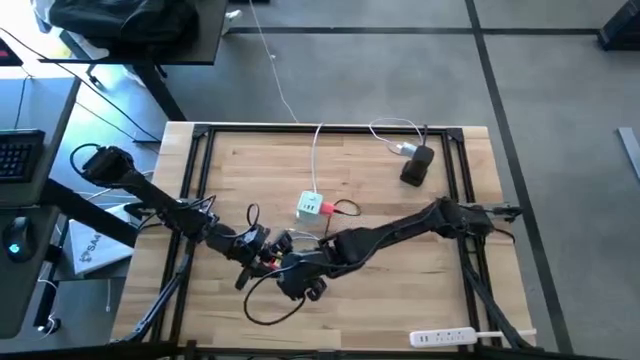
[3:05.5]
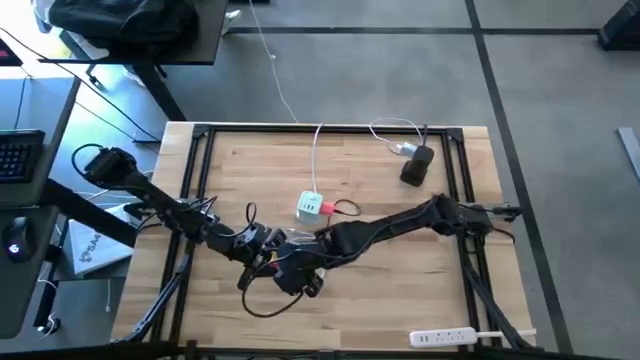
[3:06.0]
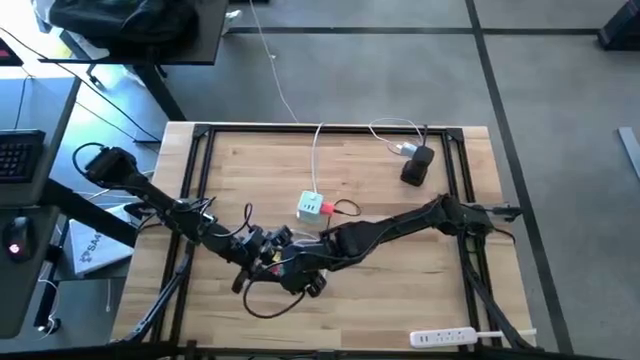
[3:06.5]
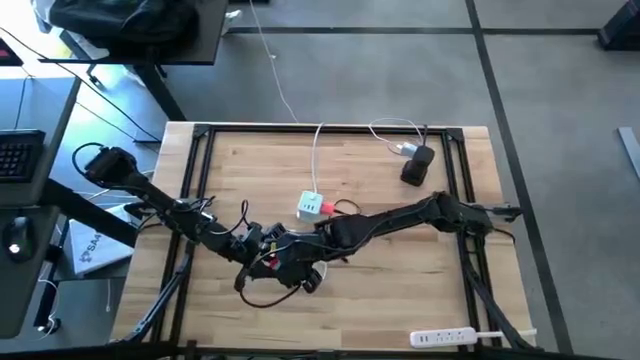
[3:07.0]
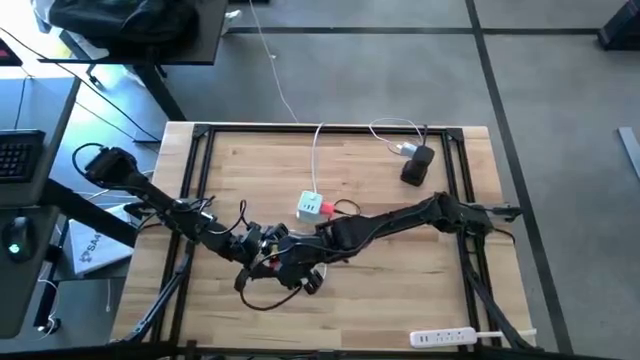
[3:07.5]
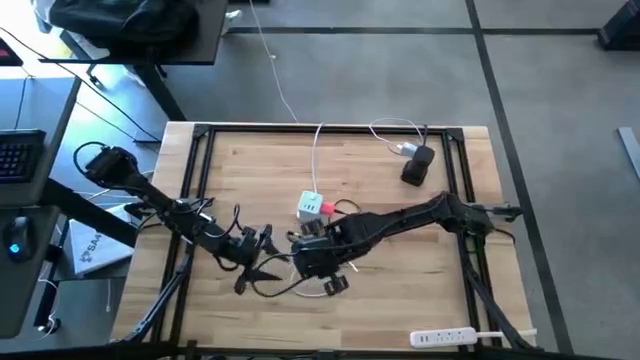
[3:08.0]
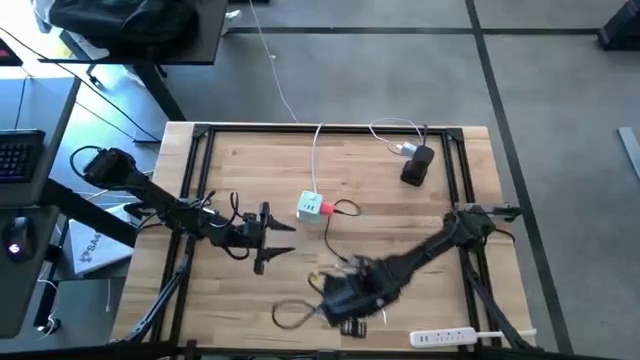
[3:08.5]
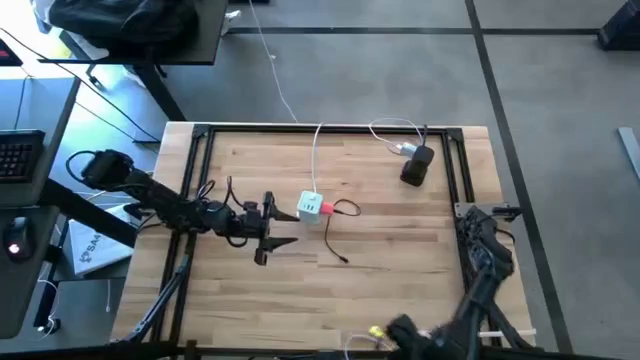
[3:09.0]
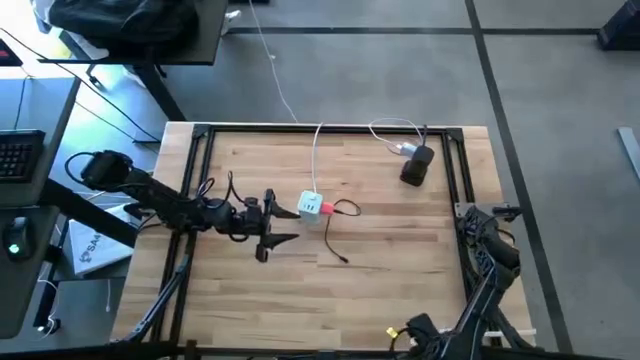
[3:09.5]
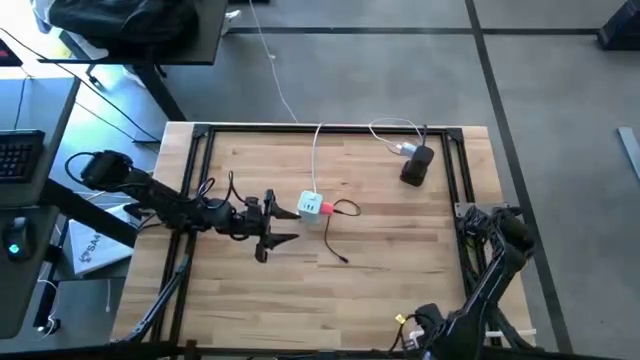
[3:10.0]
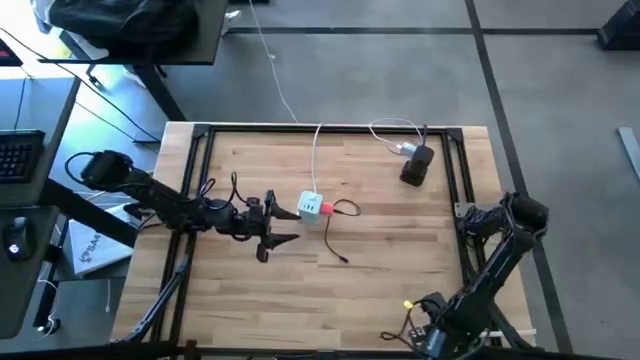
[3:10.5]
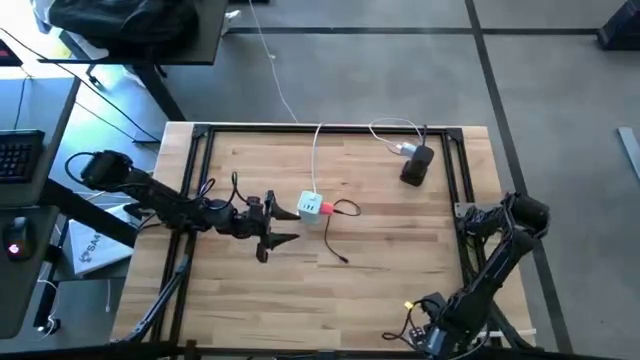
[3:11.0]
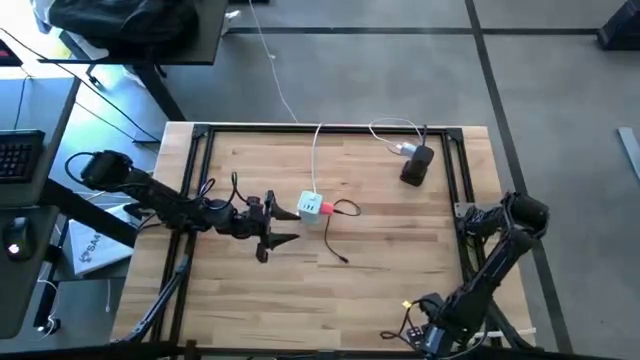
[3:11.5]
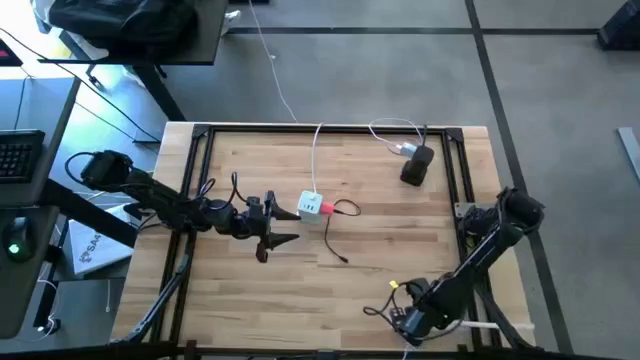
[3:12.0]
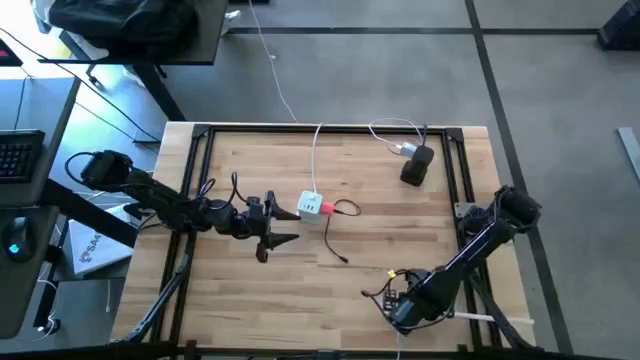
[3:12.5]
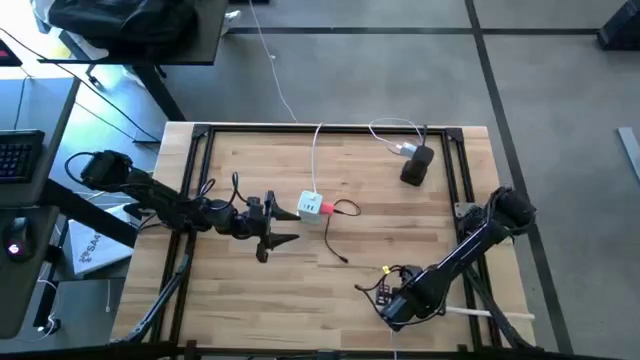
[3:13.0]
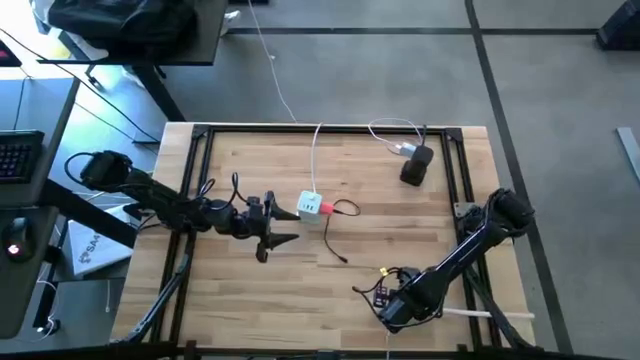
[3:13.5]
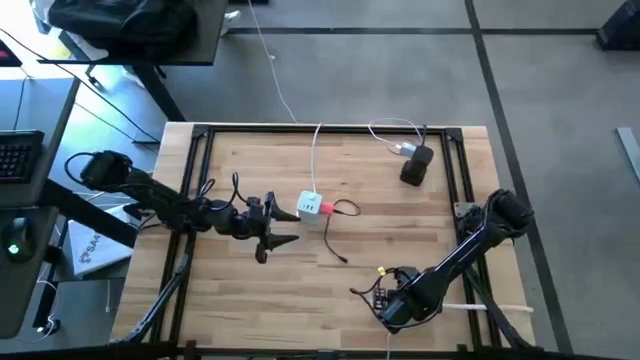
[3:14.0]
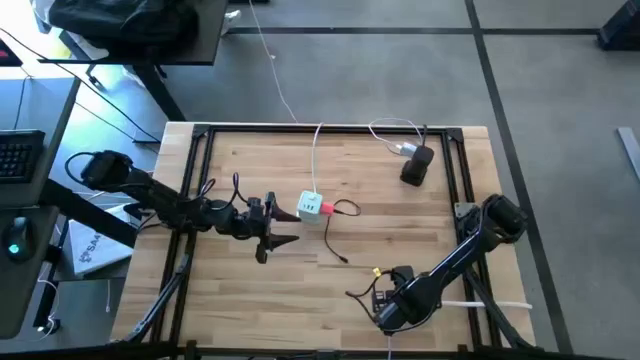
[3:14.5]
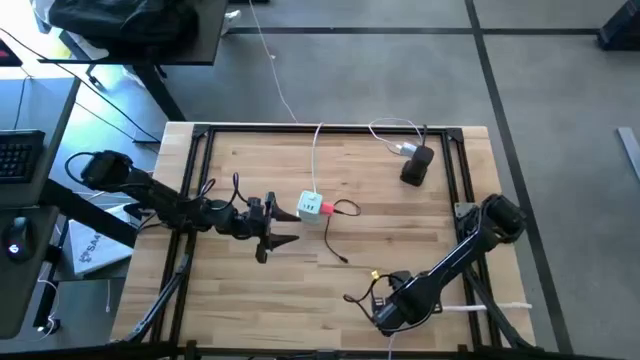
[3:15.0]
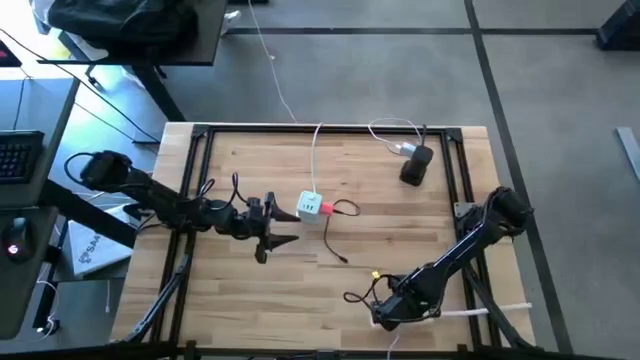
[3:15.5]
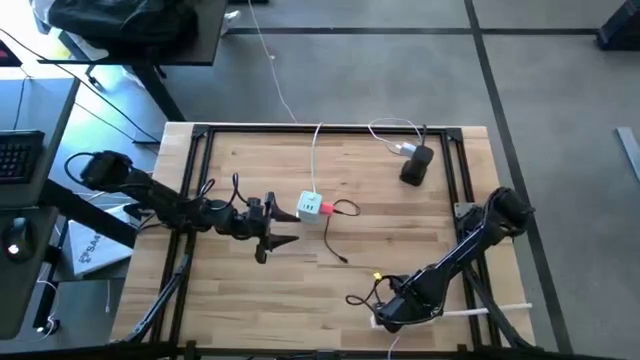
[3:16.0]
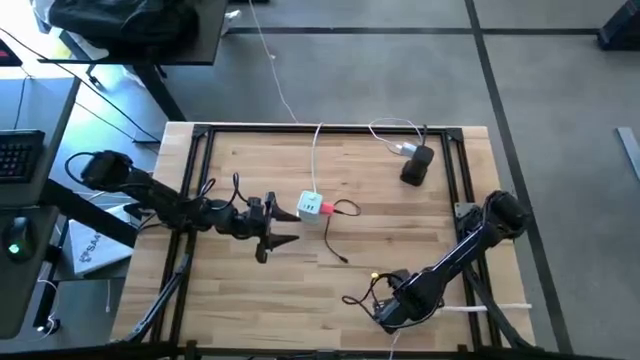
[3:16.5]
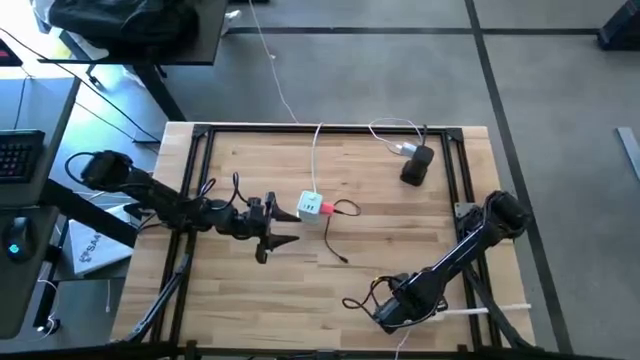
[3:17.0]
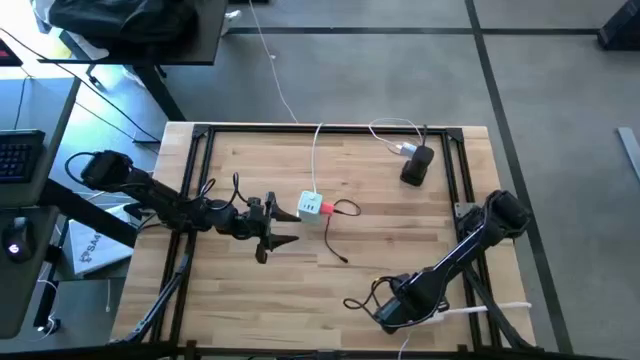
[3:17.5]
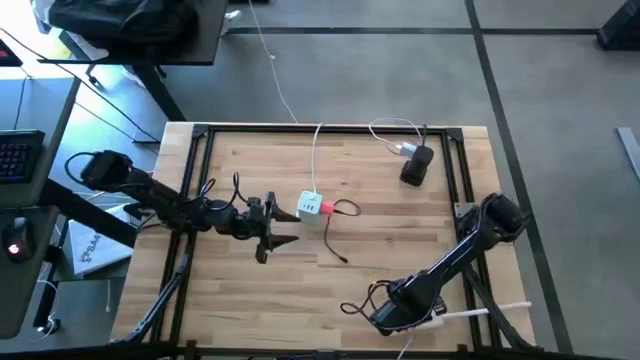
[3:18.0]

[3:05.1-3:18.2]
Task: Insert USB
Insert the pink charger adapter into the bottom white outlet extension

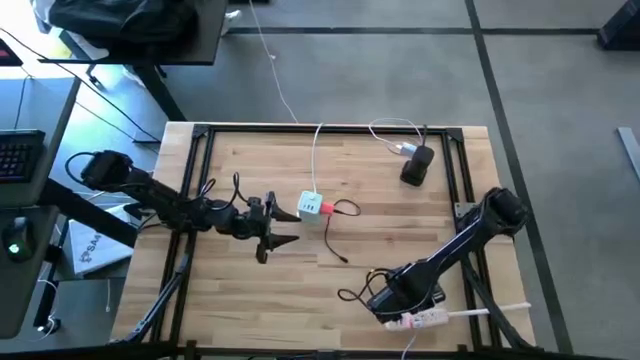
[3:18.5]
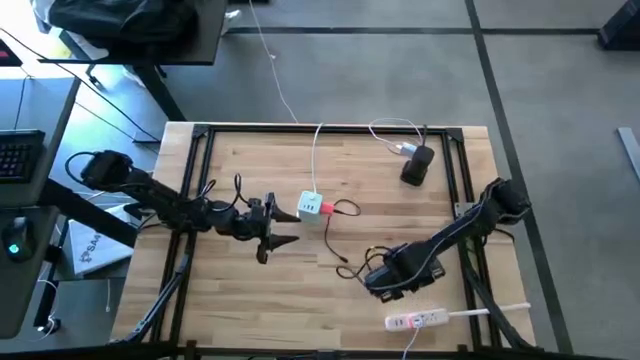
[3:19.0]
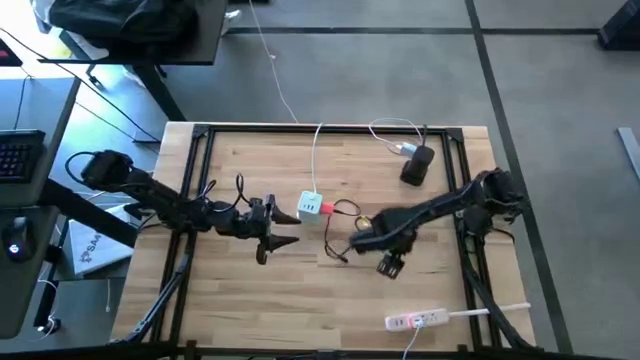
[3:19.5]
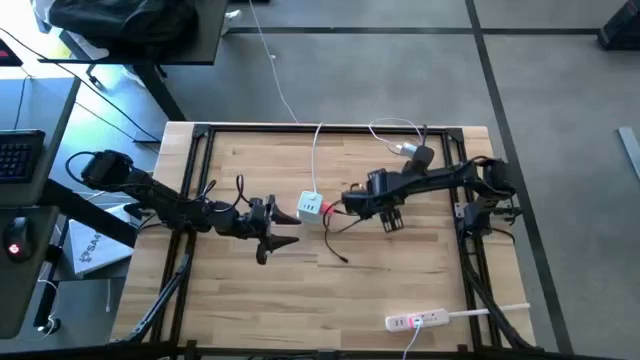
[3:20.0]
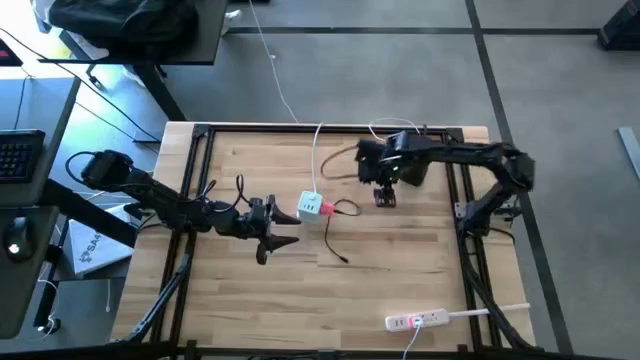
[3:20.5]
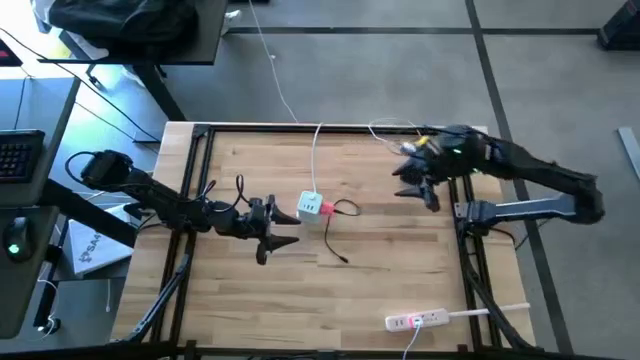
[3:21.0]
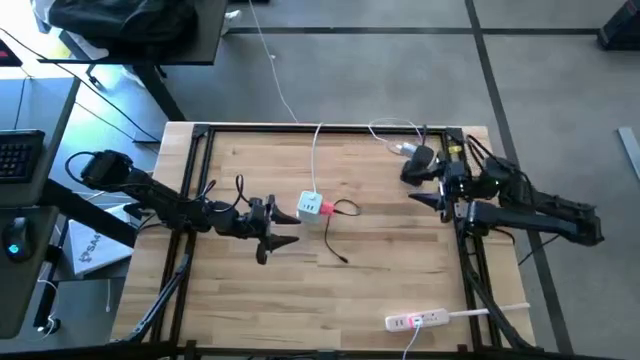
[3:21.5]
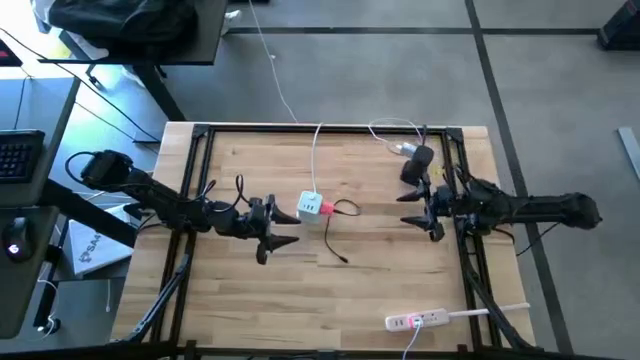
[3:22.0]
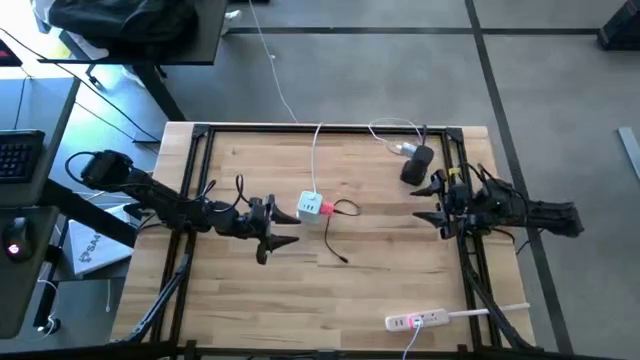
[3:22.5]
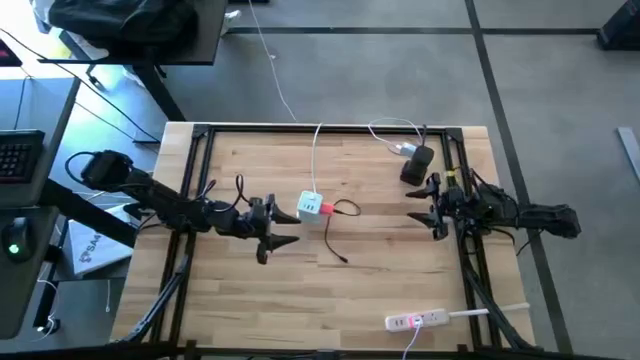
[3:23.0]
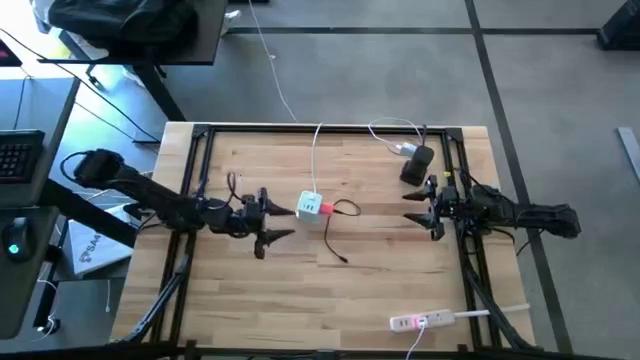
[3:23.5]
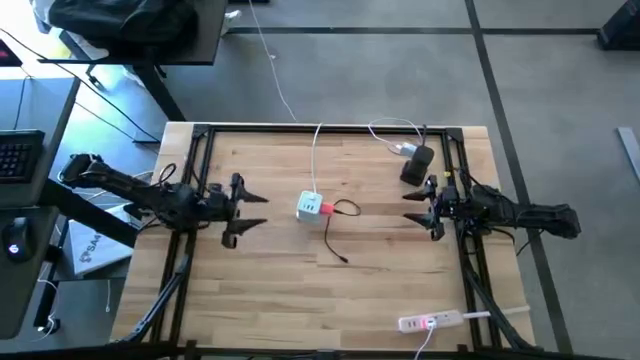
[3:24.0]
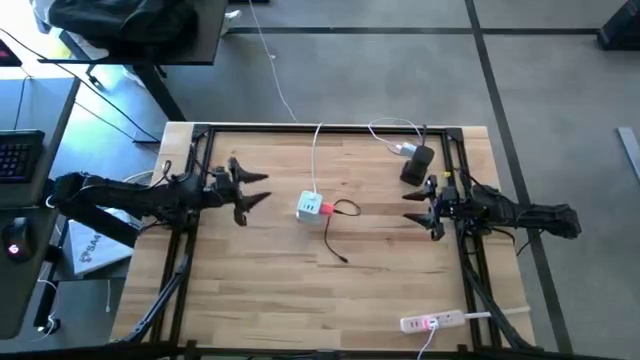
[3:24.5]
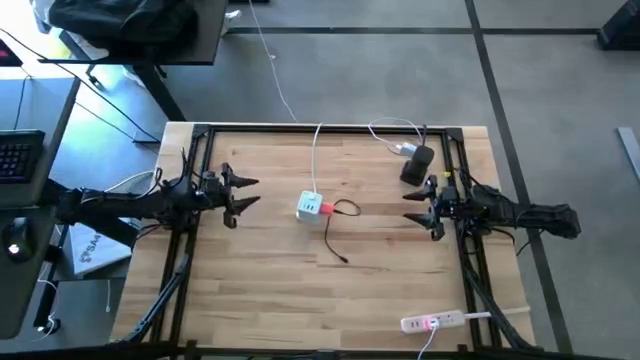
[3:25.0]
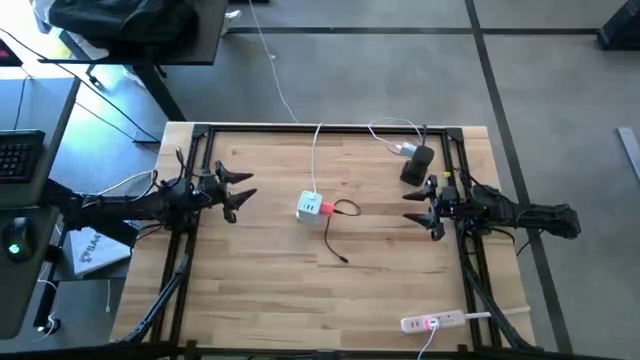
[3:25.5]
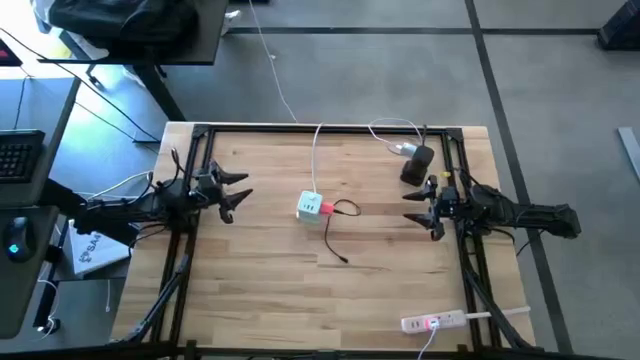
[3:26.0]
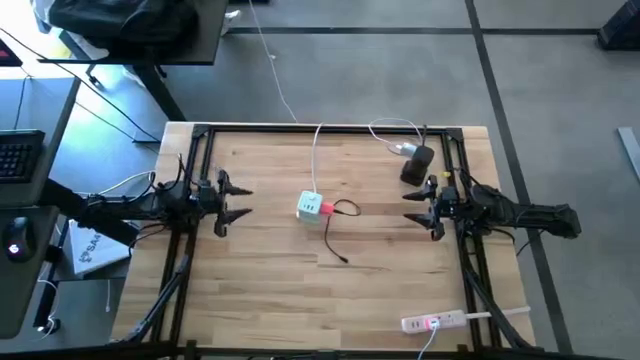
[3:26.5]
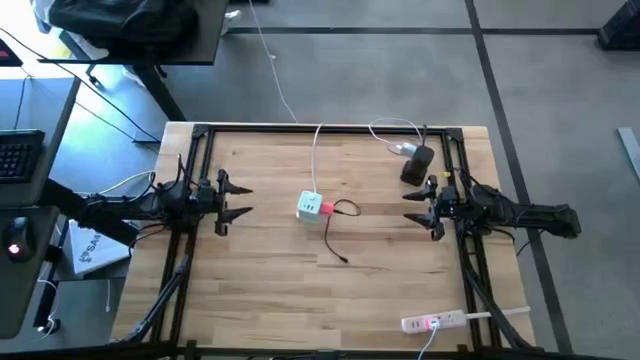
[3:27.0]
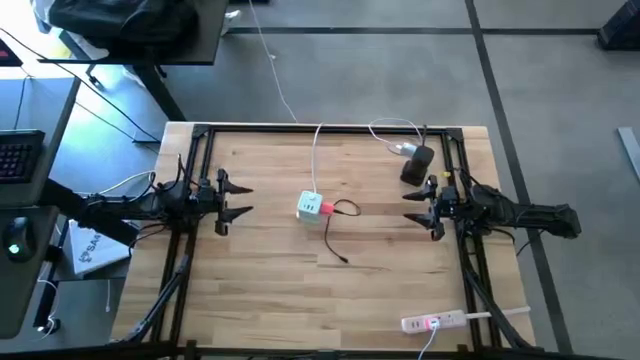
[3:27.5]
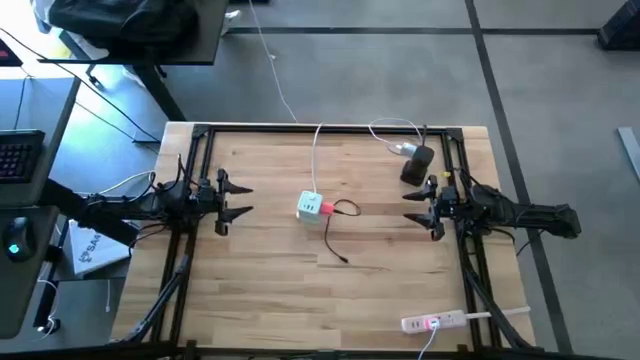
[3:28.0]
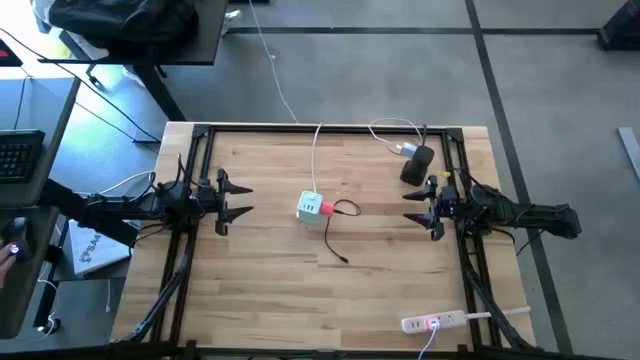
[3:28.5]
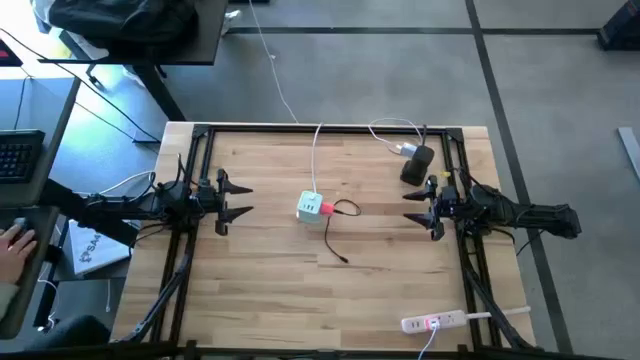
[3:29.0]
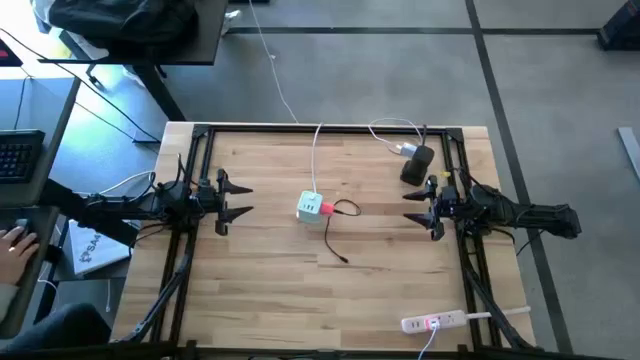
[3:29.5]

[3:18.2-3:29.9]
Return to Home Position
